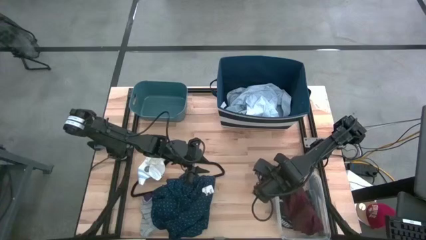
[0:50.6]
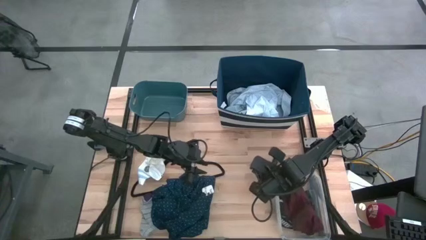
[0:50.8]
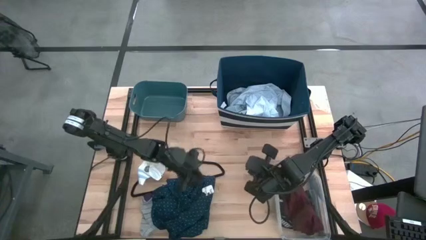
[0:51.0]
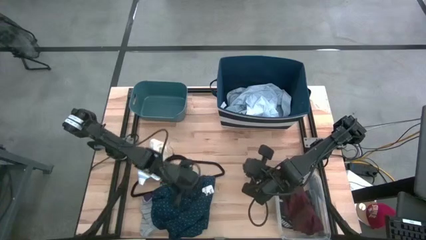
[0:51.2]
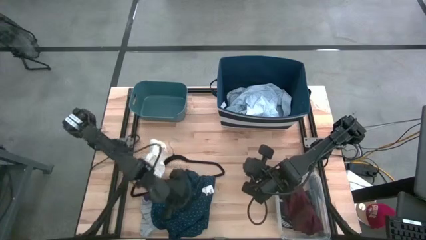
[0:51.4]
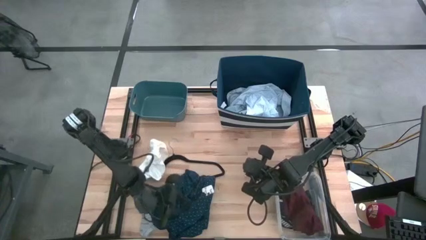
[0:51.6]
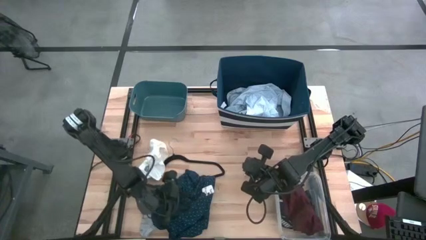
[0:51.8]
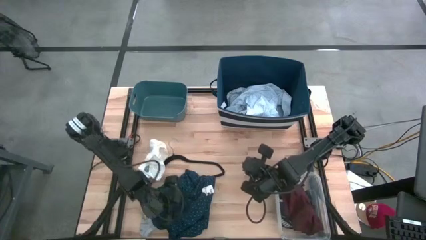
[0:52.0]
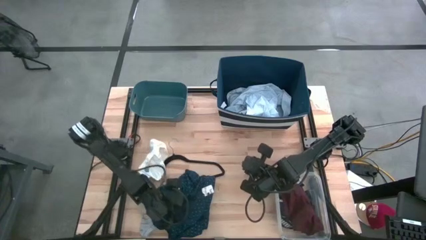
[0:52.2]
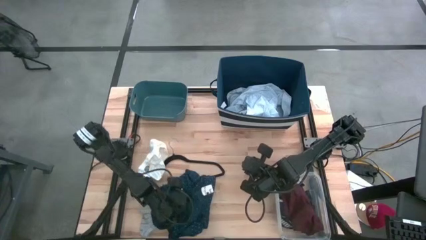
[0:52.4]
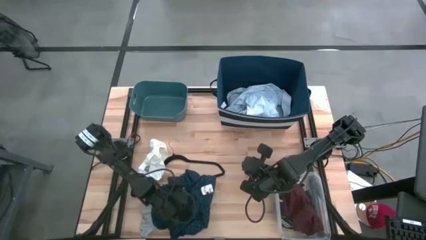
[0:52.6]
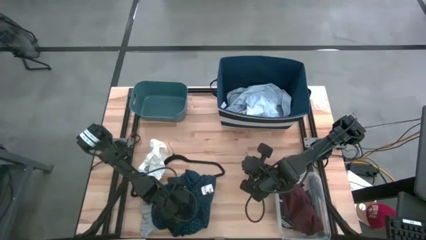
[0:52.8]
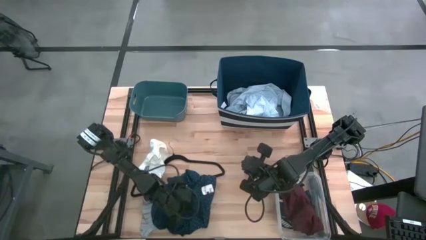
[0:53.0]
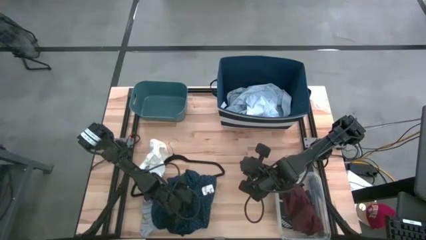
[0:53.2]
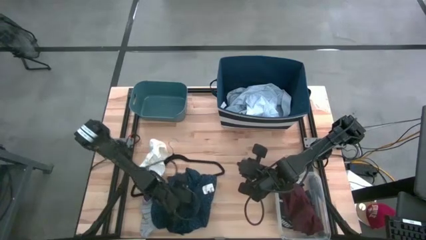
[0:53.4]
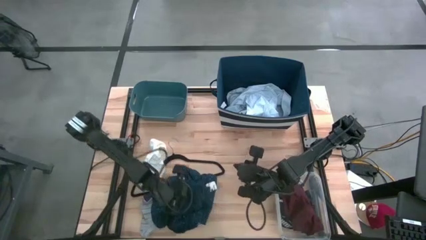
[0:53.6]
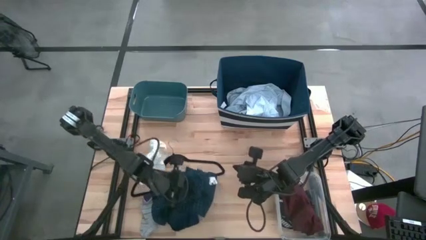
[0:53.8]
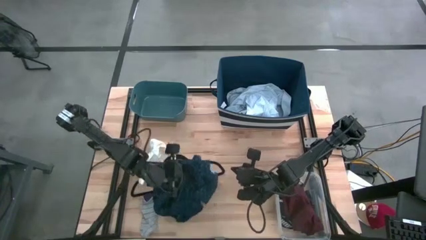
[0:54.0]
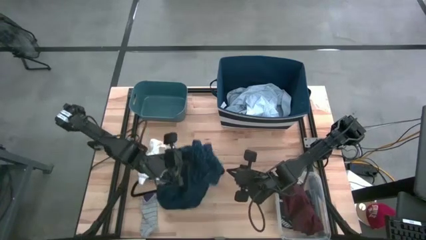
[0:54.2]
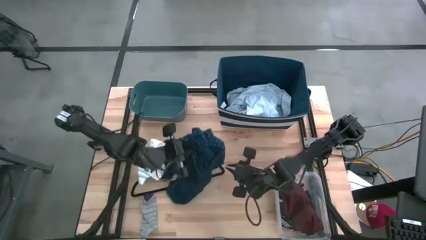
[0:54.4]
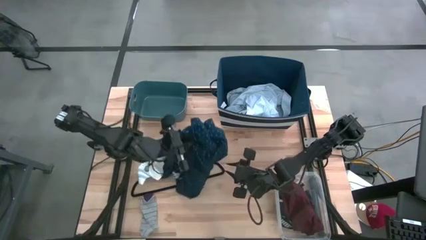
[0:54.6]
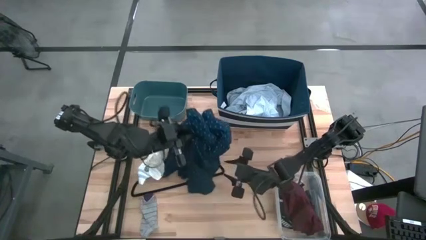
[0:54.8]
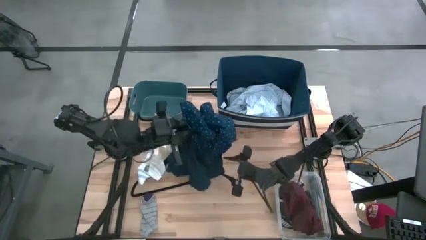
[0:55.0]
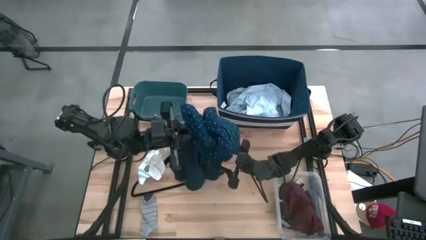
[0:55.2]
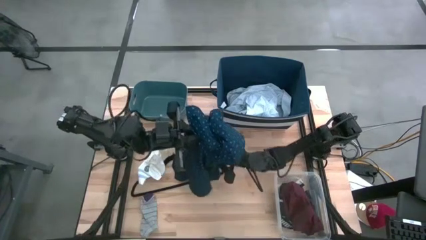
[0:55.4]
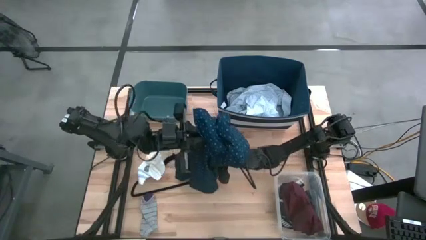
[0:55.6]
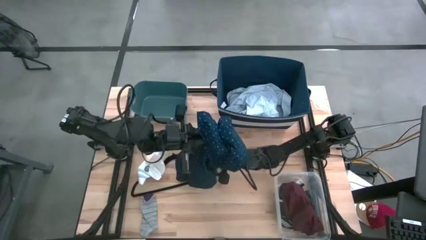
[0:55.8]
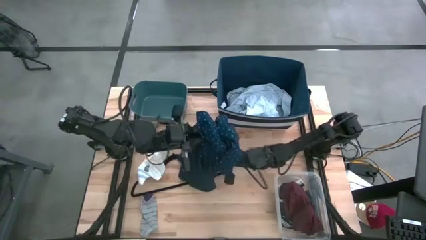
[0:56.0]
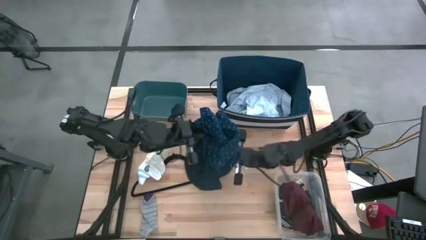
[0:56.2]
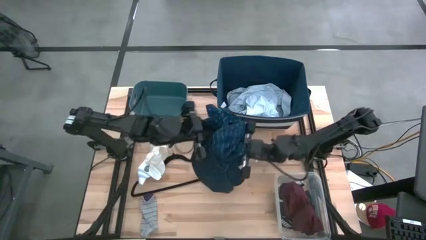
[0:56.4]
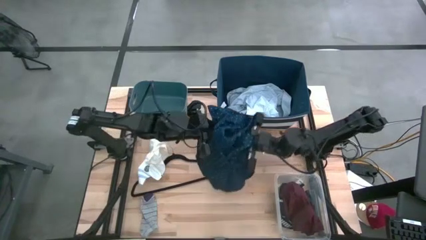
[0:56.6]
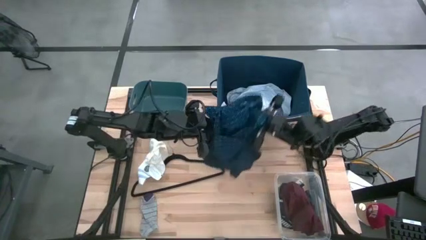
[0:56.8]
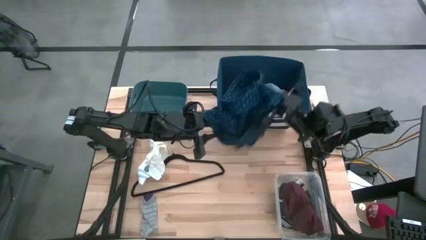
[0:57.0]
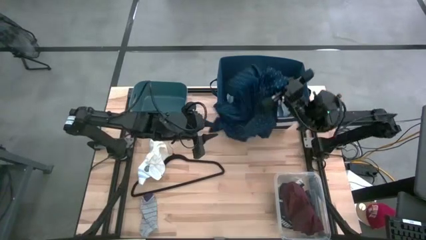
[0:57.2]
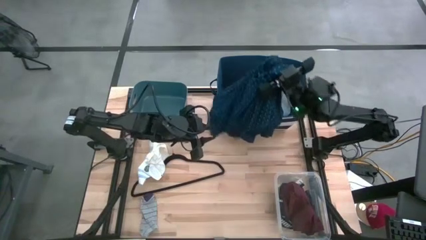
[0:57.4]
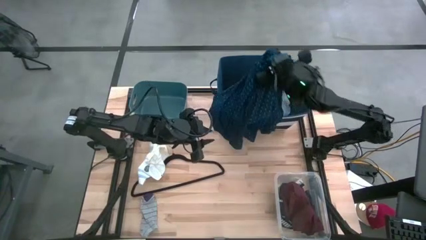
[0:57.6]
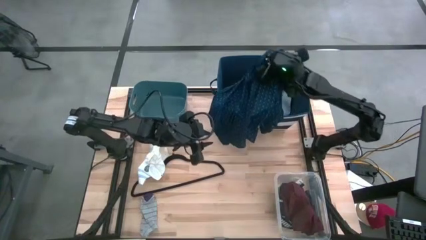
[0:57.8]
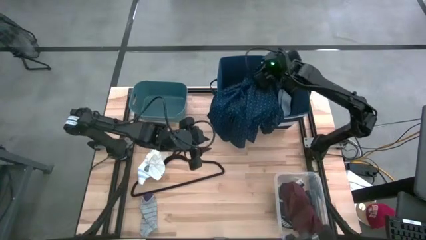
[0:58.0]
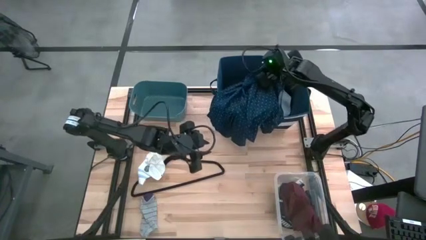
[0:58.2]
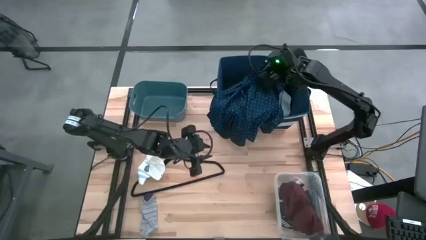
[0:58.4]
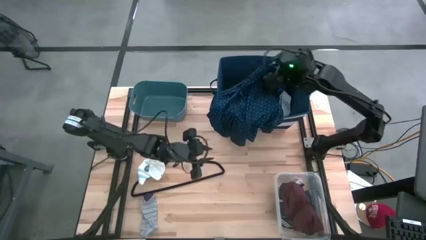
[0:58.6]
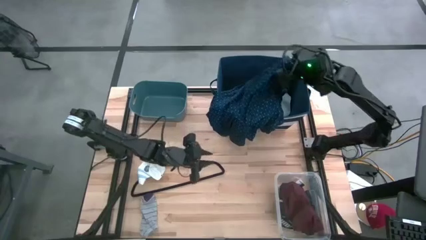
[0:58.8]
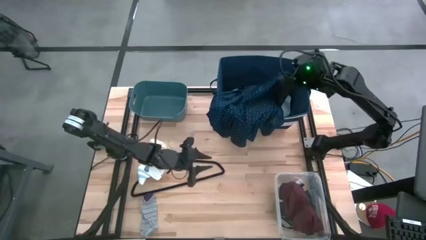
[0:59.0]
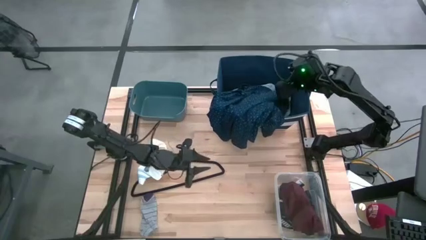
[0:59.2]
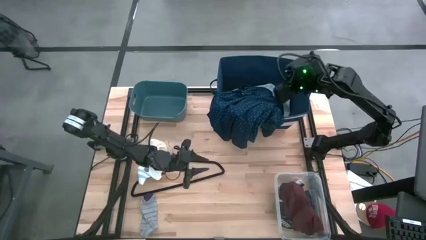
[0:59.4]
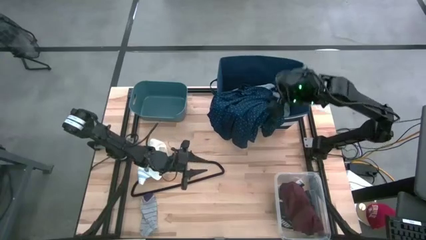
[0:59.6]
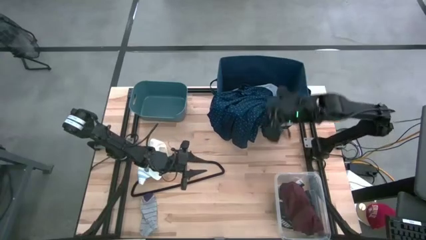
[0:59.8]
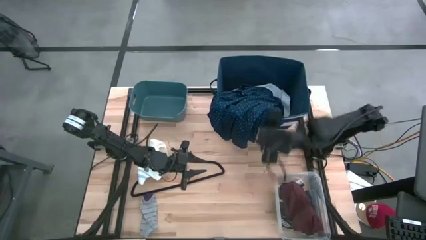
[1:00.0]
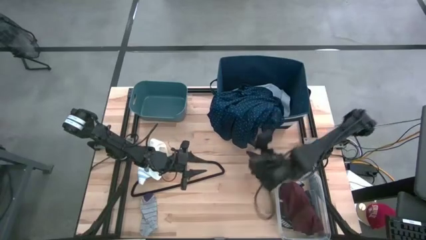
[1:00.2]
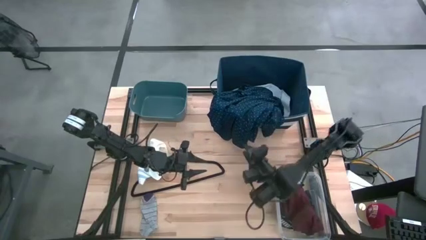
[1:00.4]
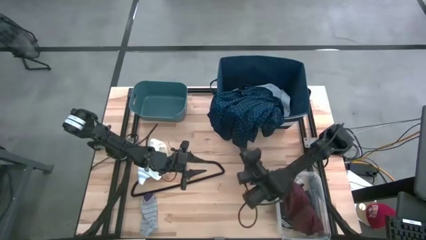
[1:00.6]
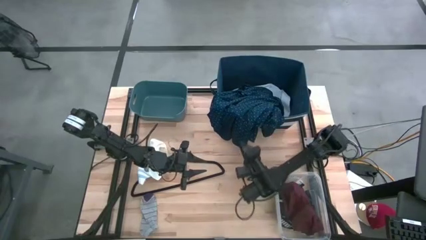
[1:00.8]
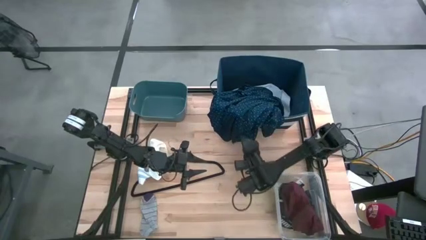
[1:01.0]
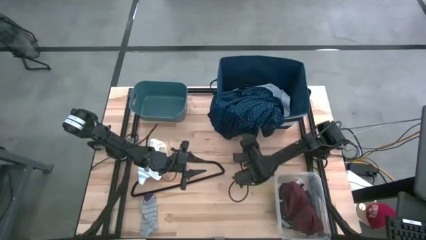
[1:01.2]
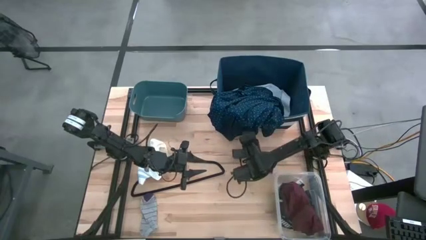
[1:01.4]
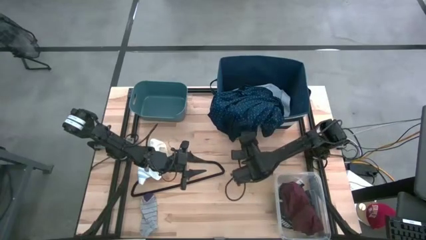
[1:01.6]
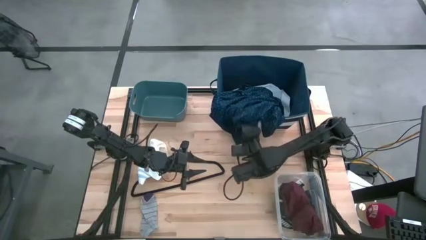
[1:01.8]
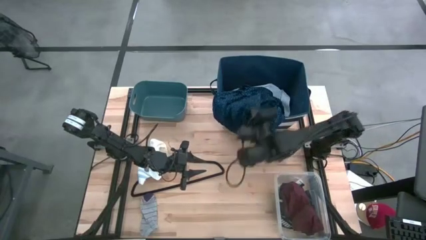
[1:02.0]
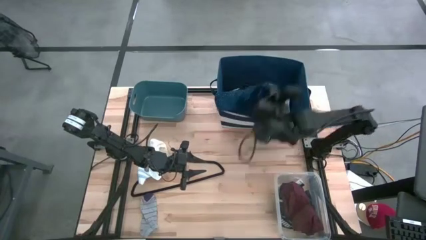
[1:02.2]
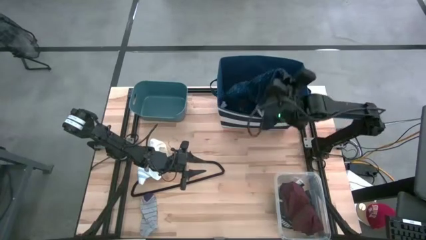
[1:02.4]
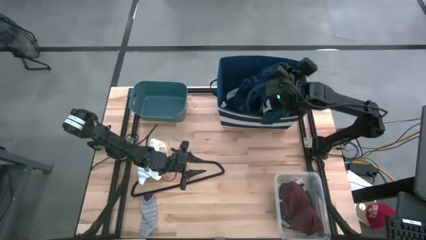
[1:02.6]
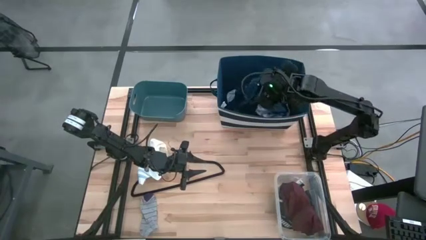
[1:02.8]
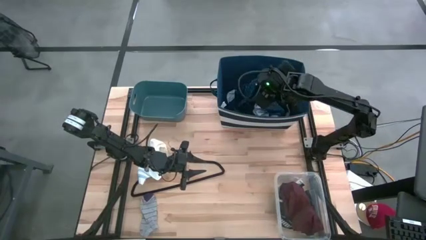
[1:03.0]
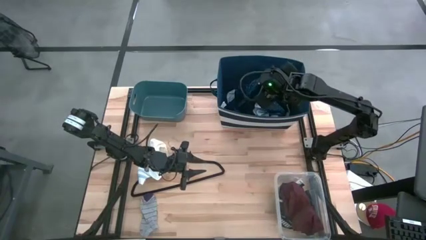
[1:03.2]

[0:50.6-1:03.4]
Task: Pick & Place Cloths
Put the blue polo shirt into the blue bin
